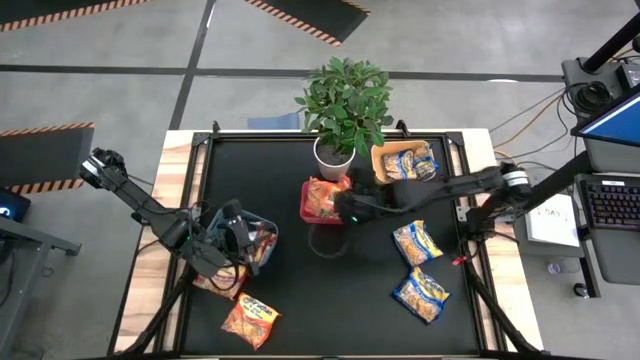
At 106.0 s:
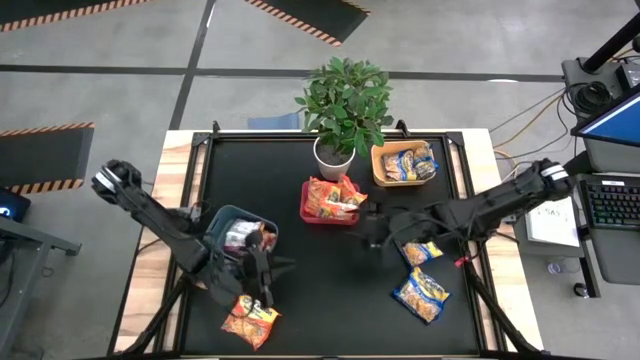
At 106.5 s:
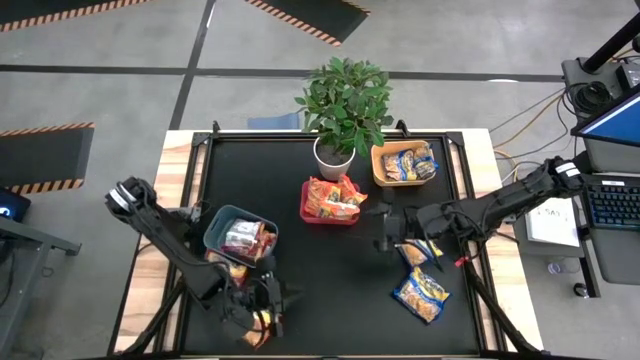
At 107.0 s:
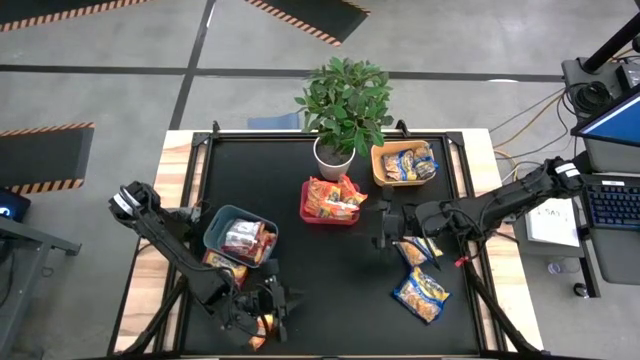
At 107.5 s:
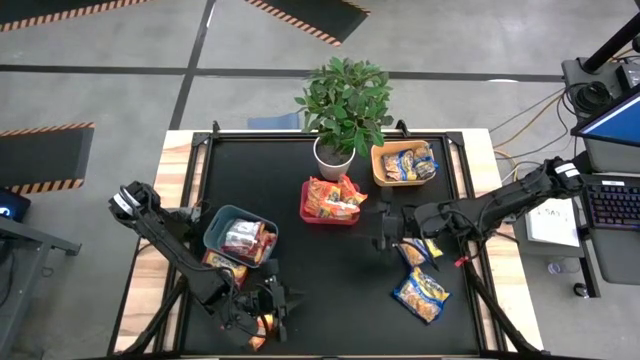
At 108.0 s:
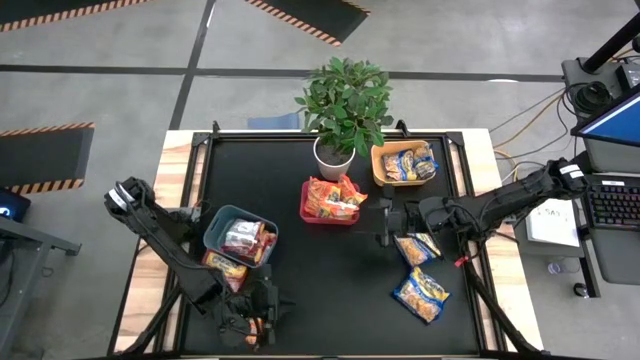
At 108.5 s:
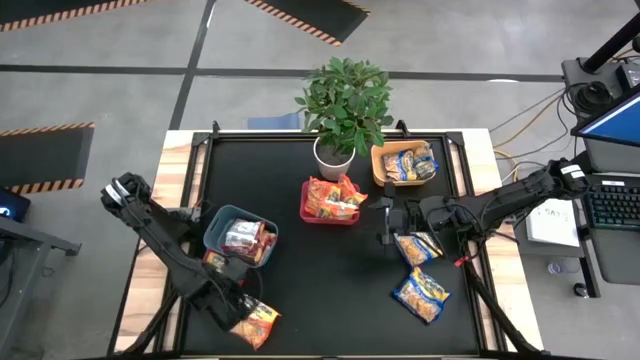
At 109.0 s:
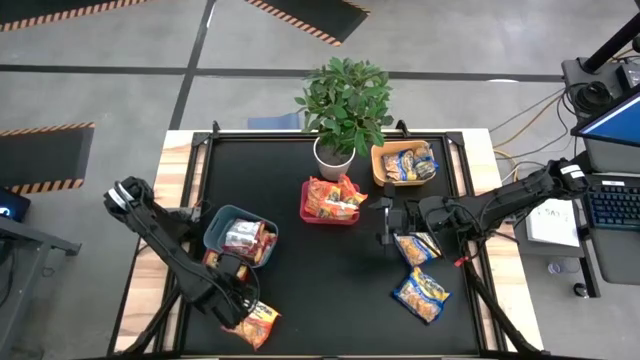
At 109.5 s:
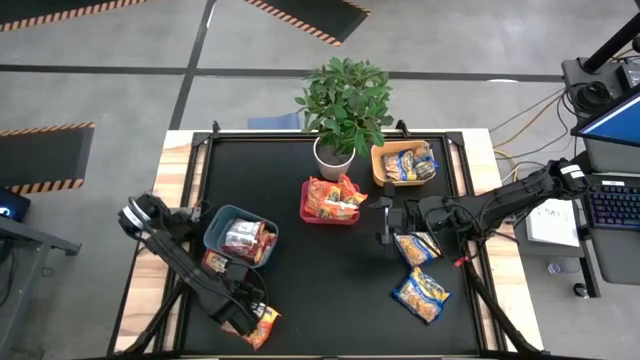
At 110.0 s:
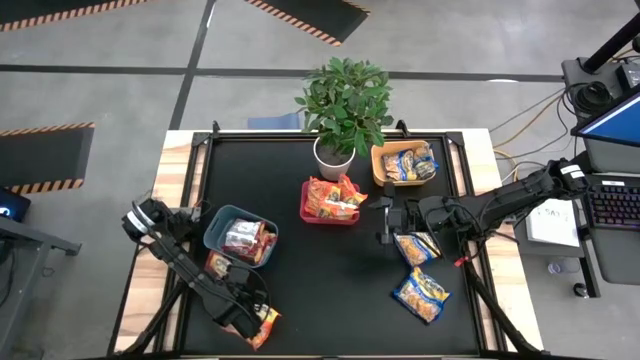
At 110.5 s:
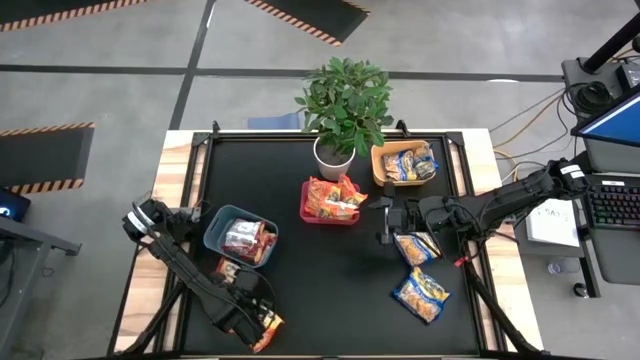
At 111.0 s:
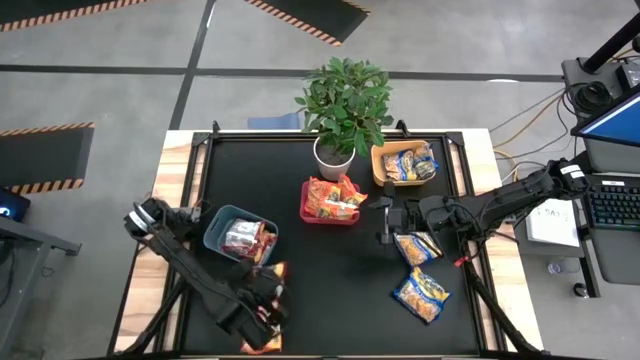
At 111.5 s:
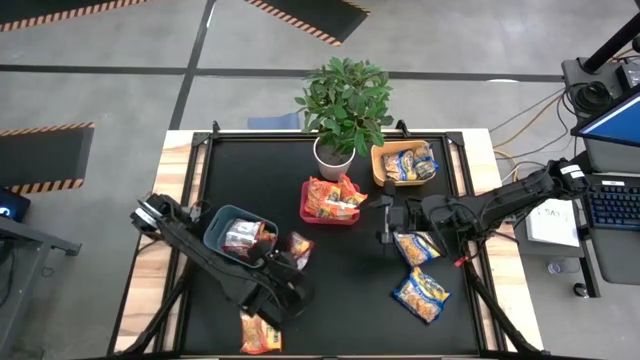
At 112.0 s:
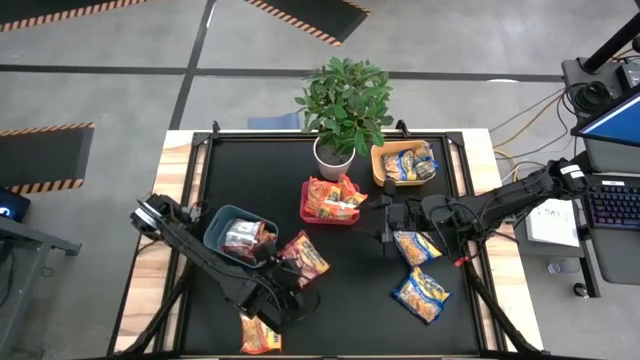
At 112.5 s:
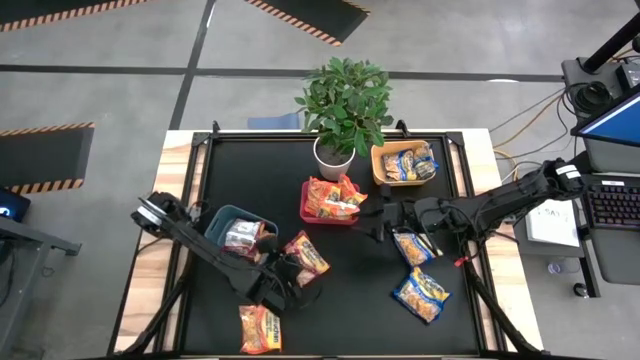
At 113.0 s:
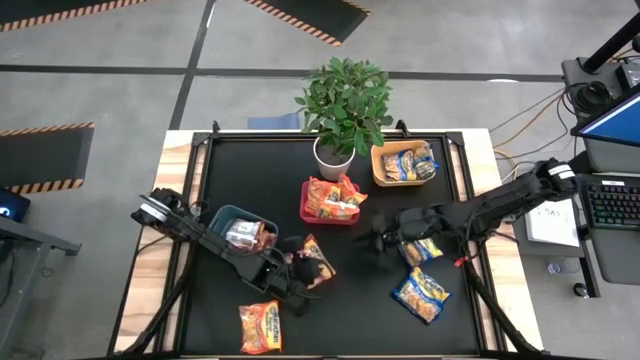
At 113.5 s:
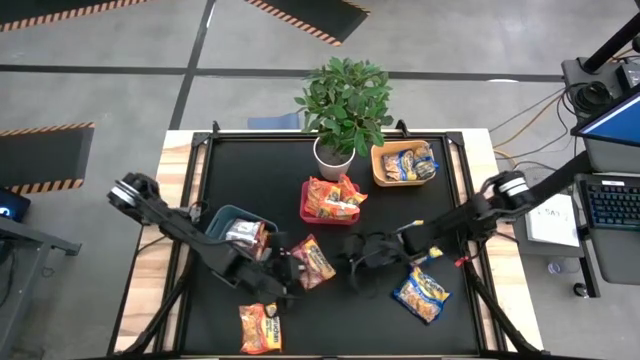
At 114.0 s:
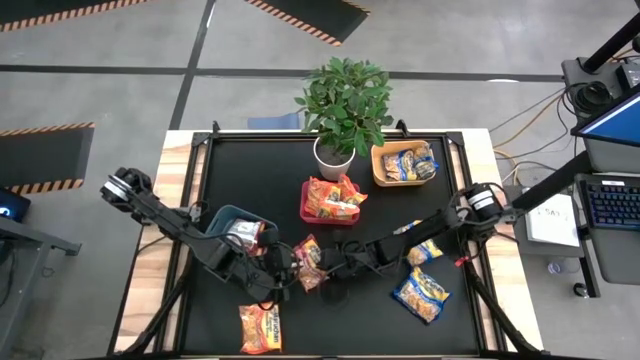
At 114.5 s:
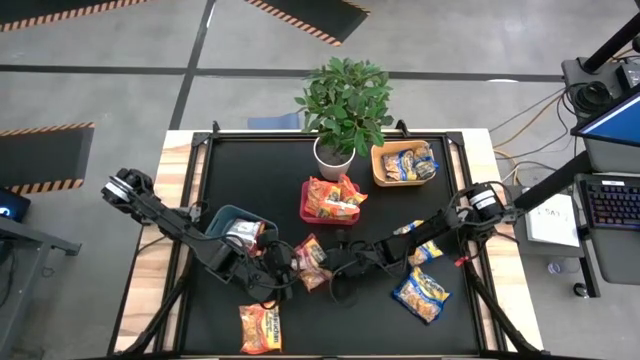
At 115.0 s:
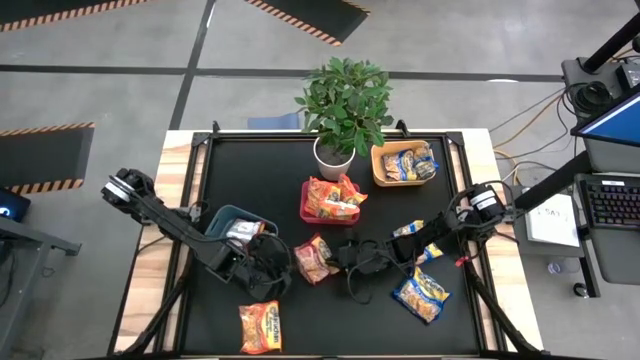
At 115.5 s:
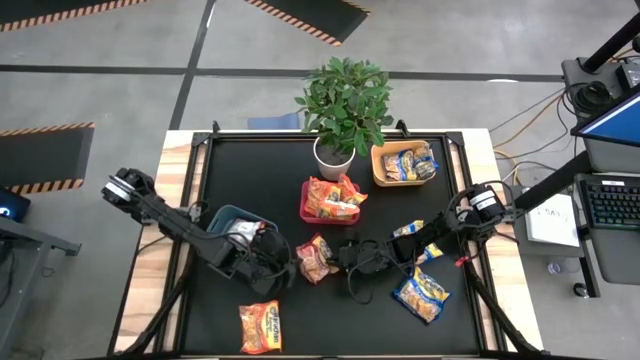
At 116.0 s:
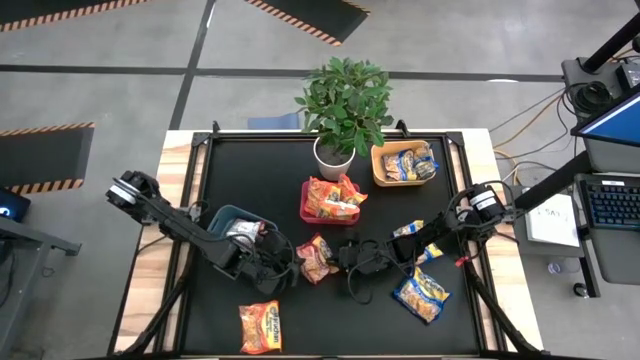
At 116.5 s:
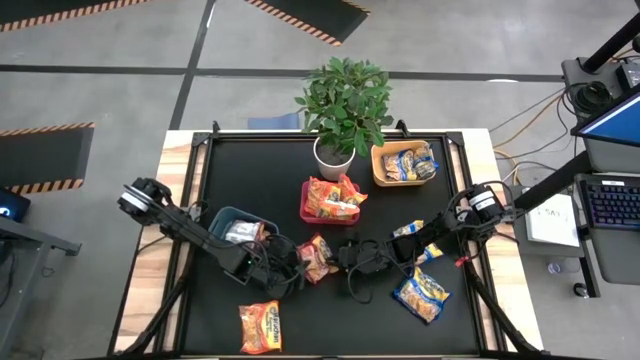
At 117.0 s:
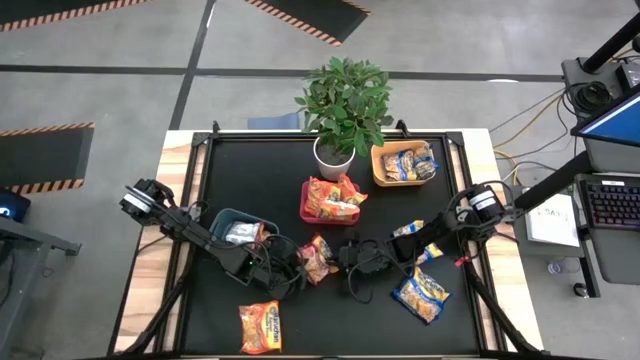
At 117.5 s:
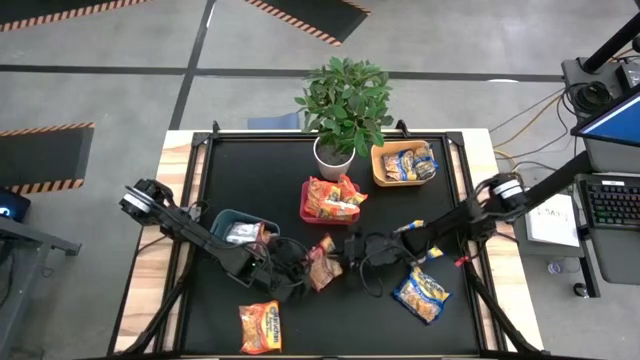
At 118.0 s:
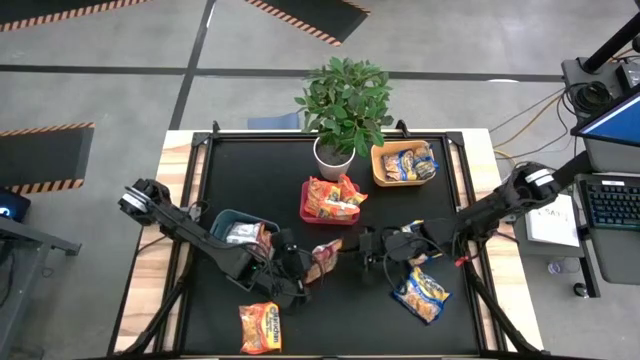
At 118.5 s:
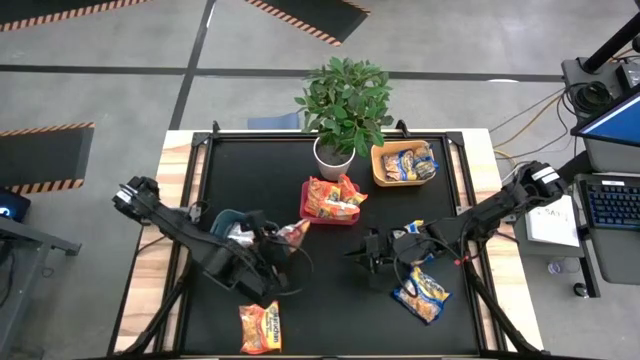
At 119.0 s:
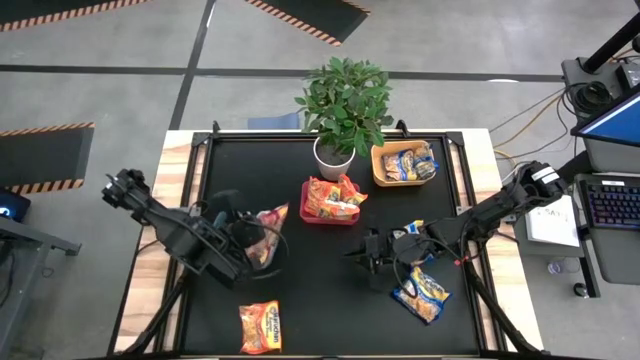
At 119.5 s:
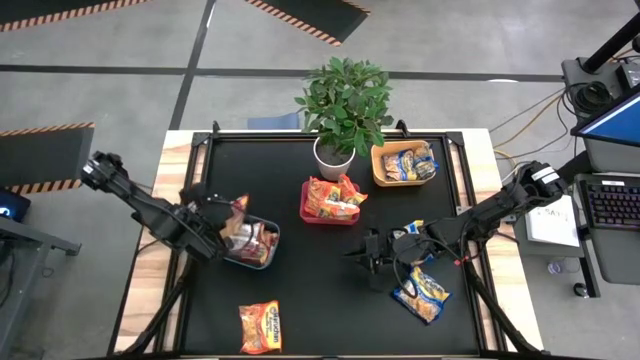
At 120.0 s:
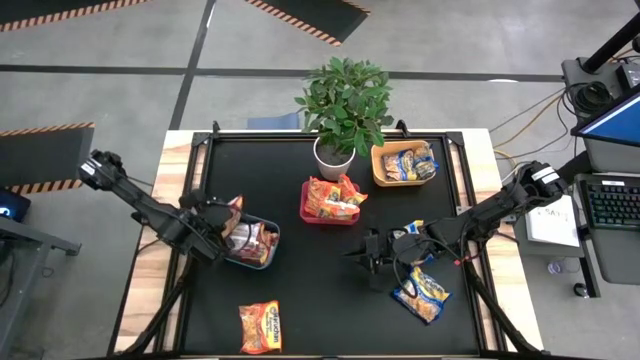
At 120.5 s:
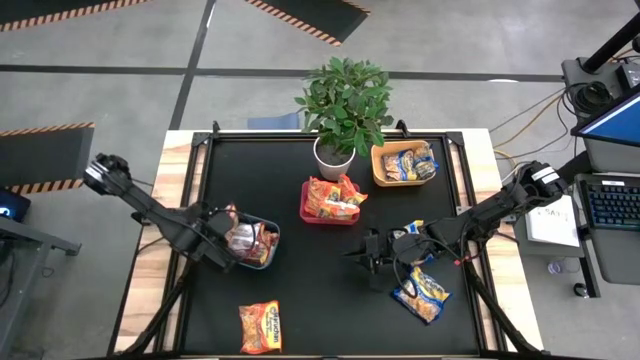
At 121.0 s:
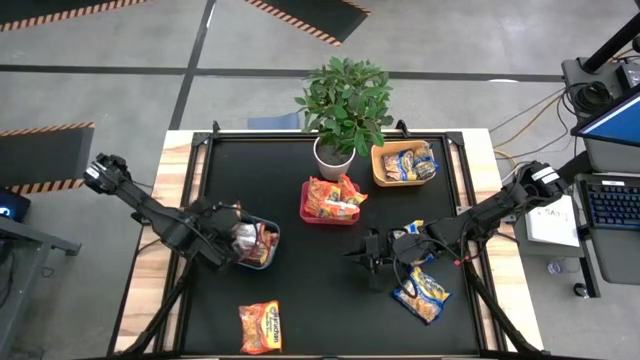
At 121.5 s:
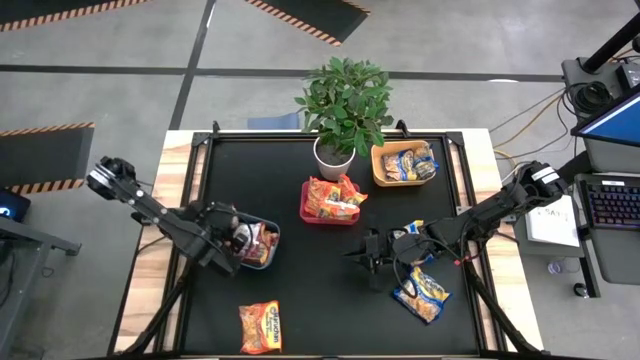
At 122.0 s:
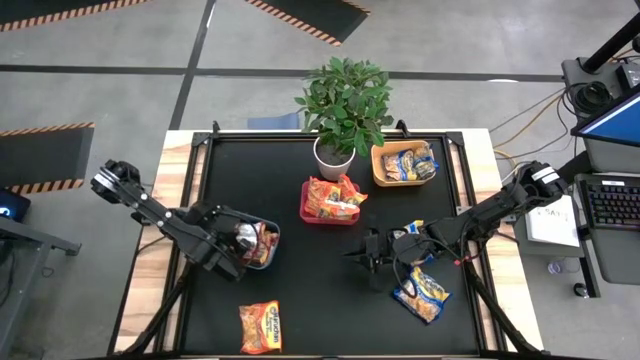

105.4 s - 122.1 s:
Task: Sort Maruchan noodles
Put the red noodle pack into the green bin

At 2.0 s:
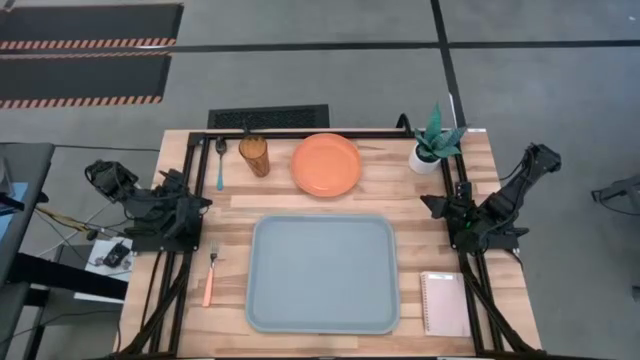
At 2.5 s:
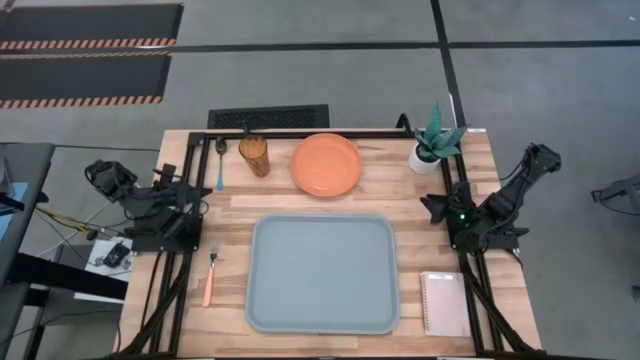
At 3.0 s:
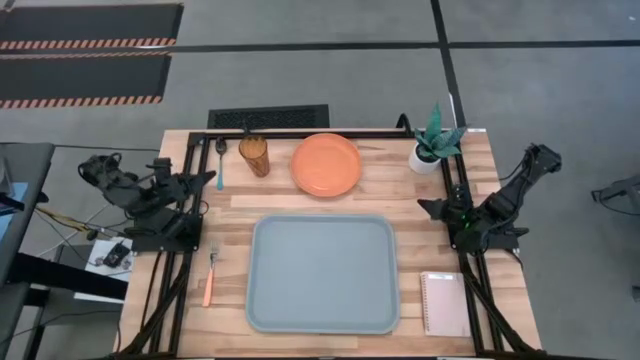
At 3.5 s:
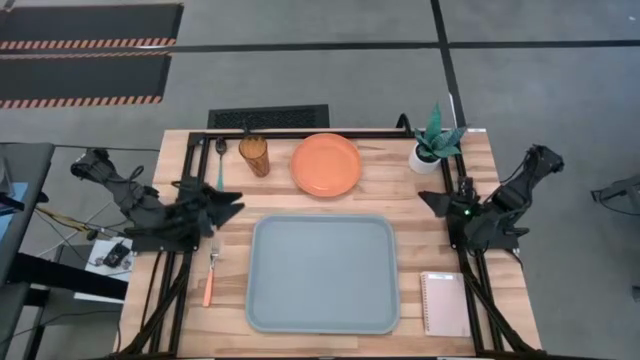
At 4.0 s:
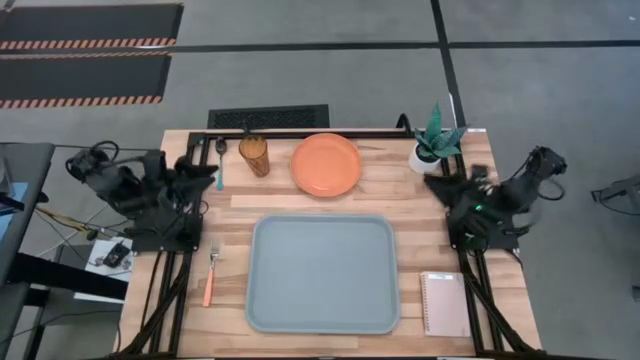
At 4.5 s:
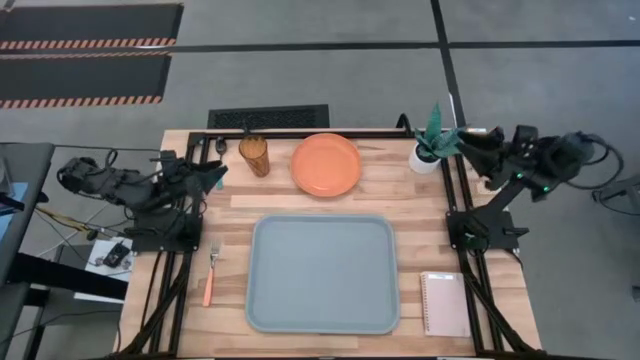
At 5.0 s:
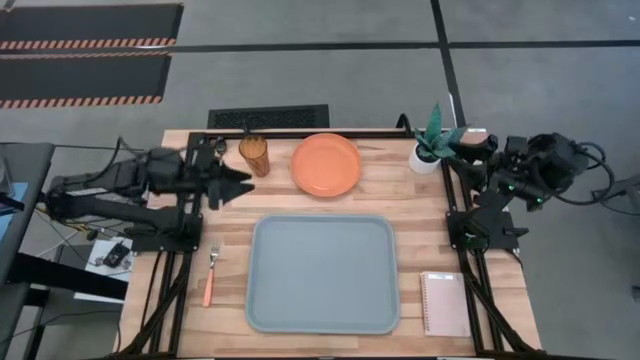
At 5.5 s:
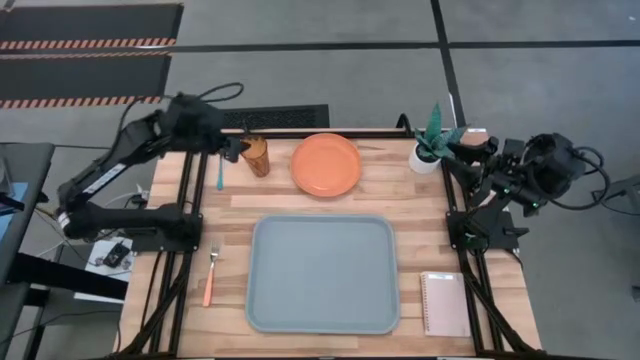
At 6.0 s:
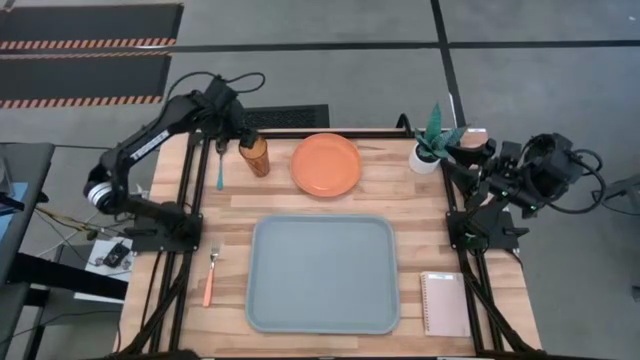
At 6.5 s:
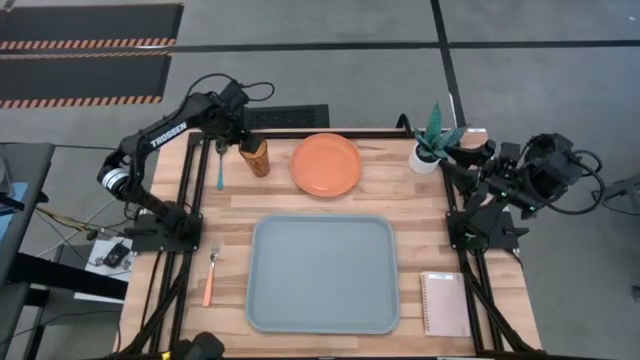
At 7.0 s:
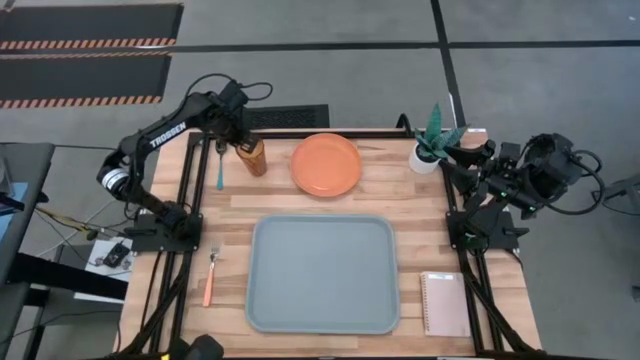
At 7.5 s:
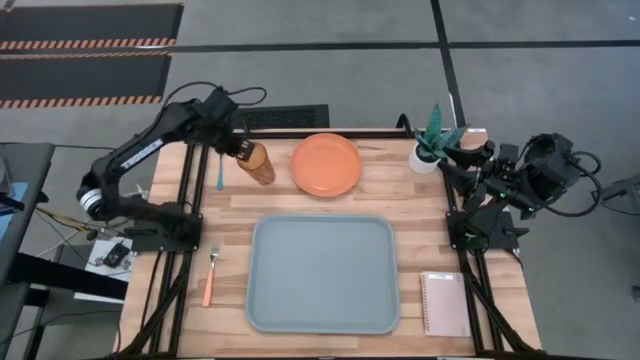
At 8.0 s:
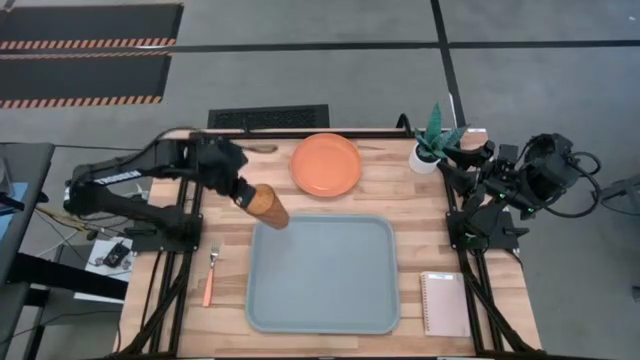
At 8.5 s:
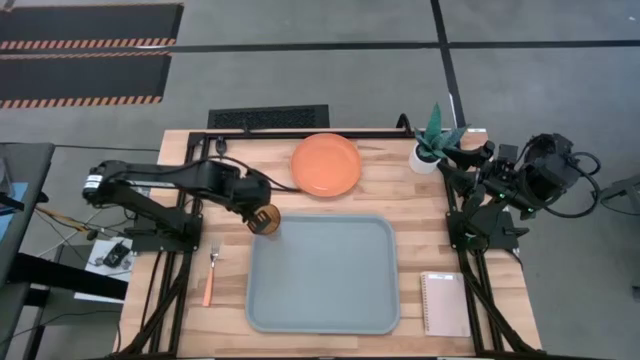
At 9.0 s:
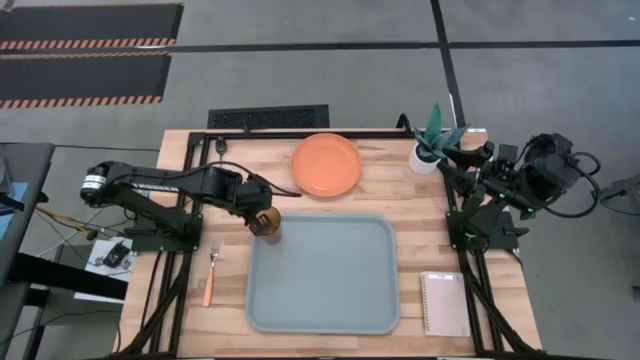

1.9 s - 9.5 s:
Task: Pick and place plate/cup/fork/spoon on tray
Put the brown cup on the top left of the gray tray
